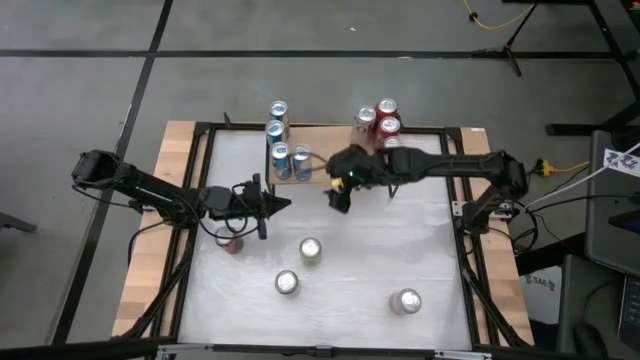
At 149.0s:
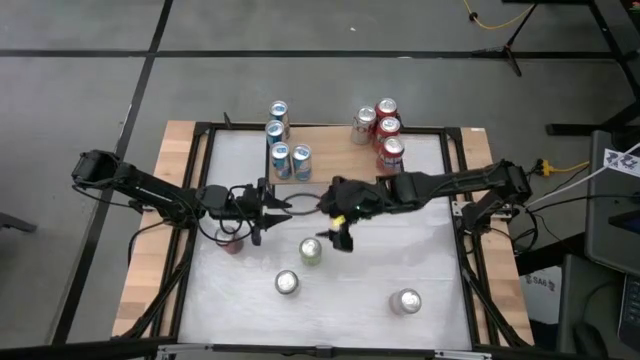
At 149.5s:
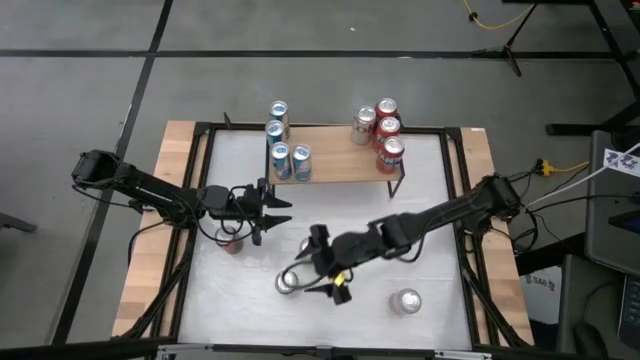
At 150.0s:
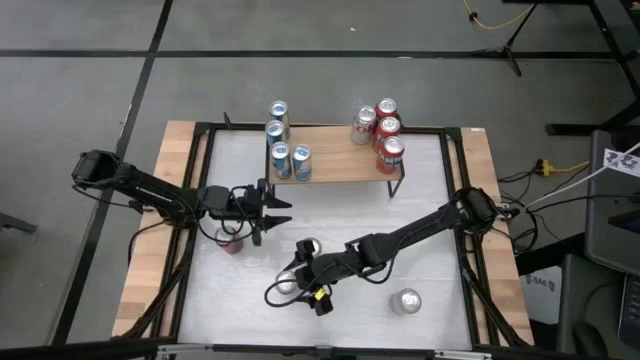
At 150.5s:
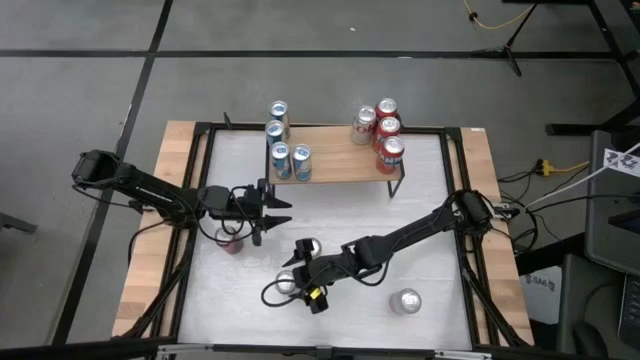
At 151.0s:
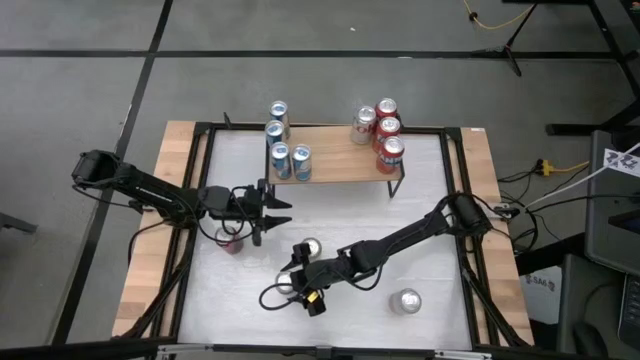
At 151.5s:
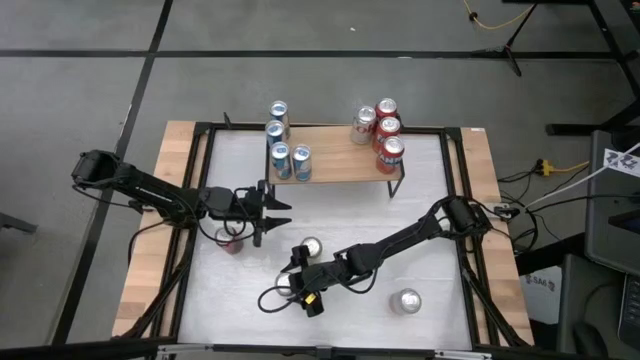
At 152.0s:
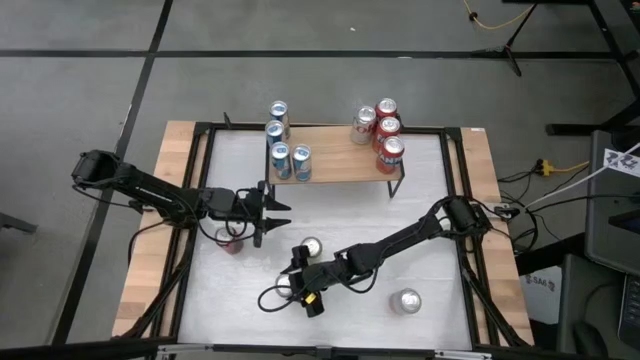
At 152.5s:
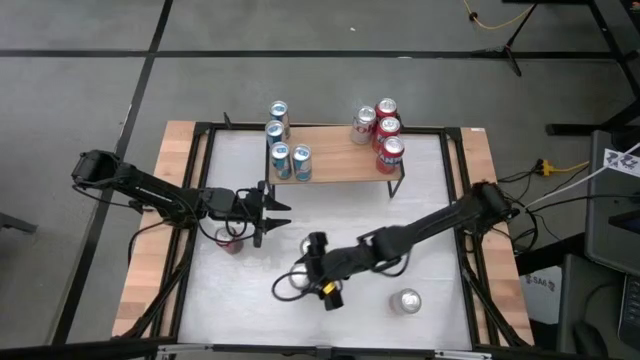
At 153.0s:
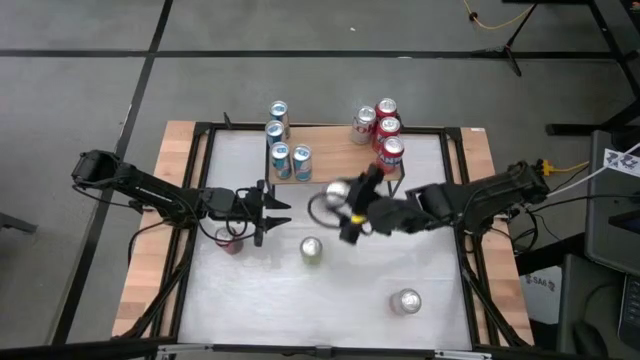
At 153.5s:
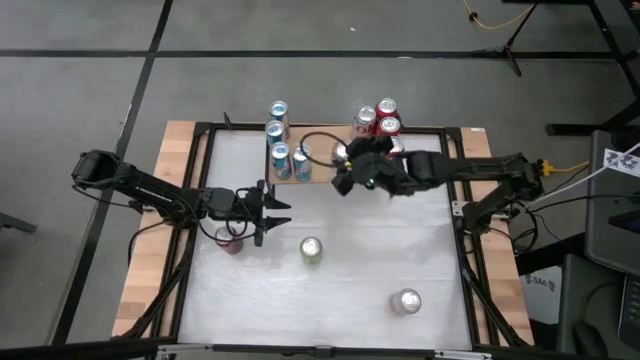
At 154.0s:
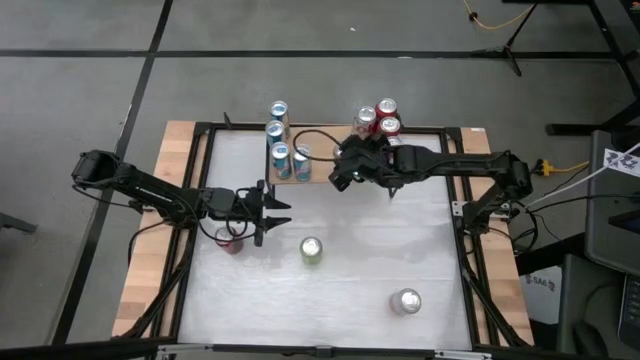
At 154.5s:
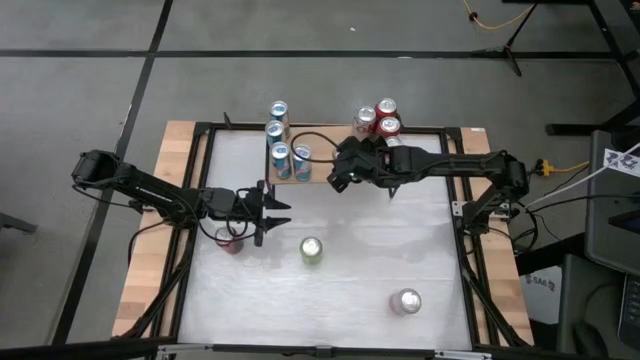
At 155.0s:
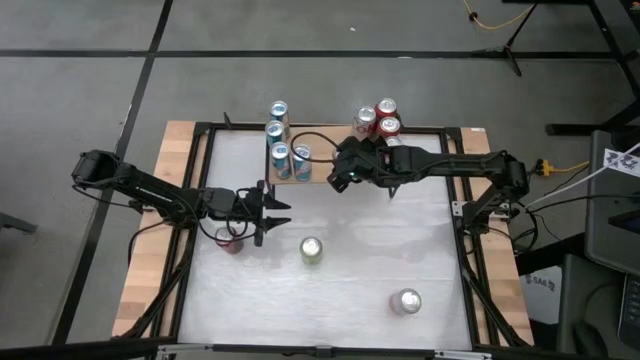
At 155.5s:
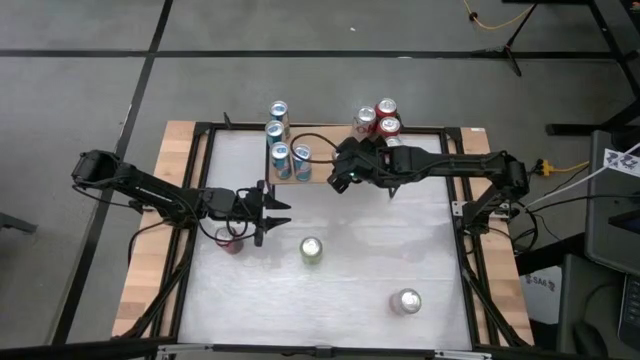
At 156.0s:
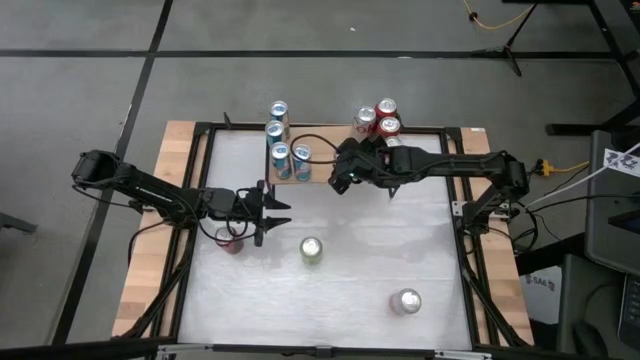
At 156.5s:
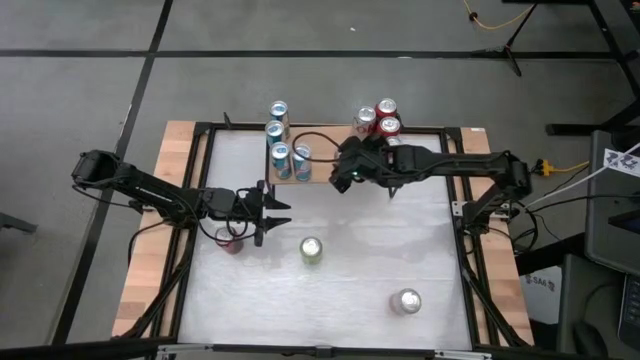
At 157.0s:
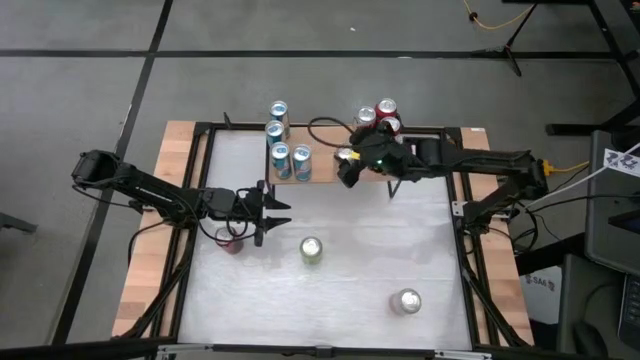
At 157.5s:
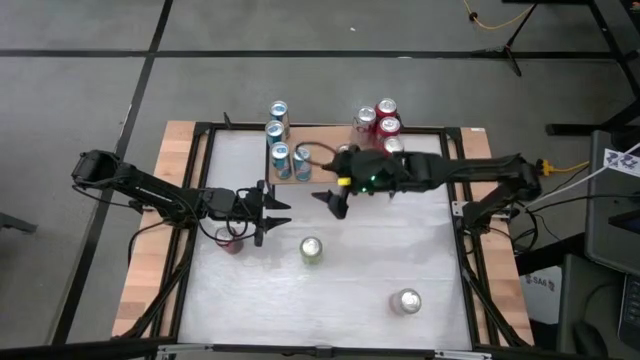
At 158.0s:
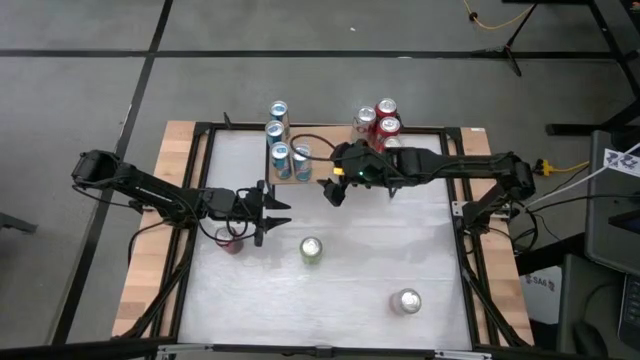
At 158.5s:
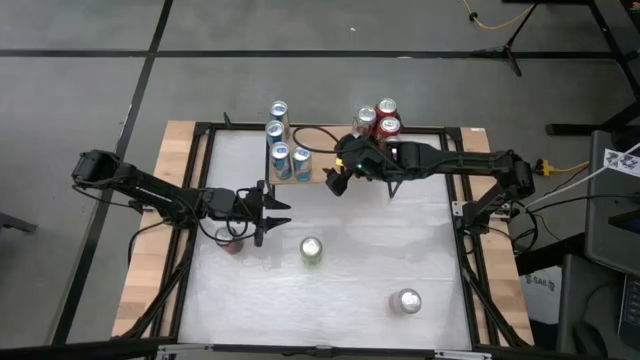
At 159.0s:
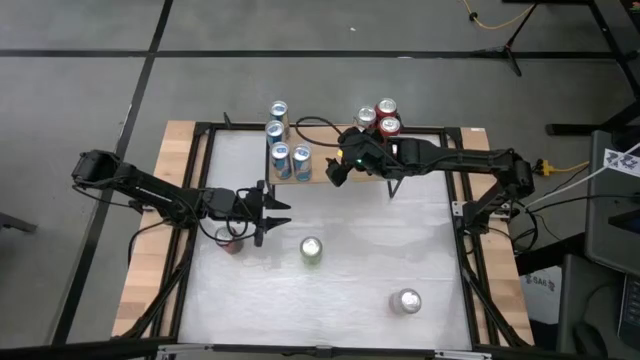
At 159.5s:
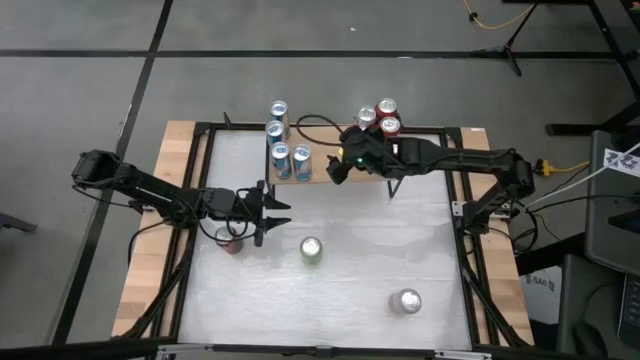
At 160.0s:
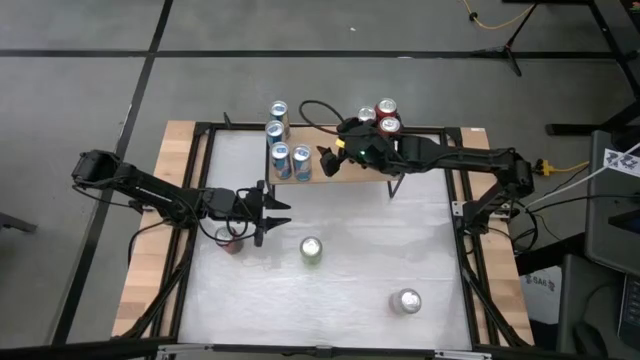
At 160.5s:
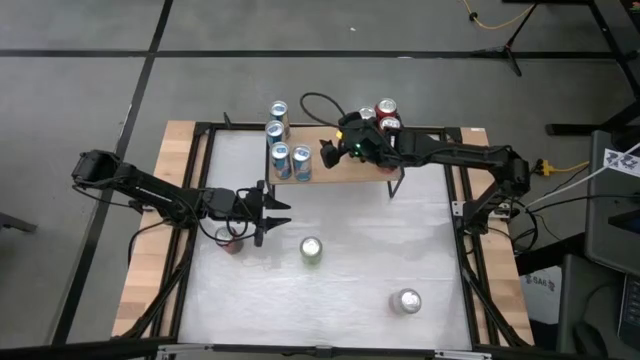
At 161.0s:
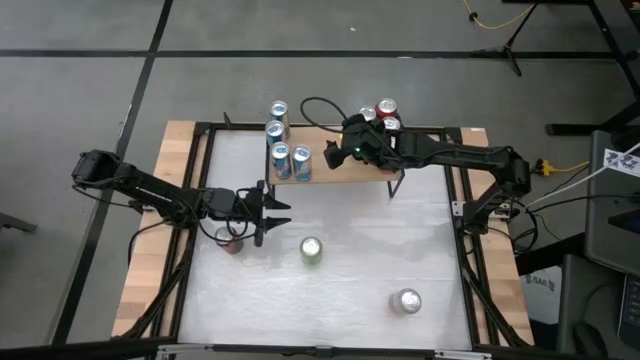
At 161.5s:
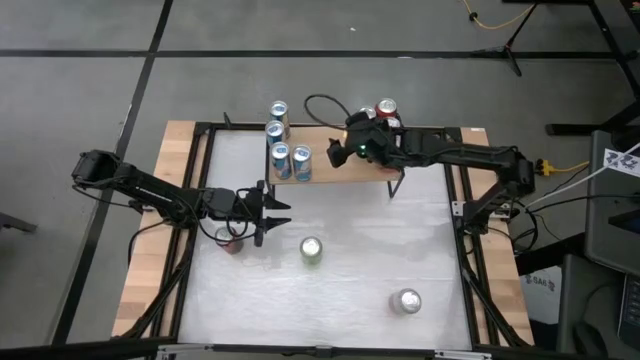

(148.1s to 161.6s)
Task: Sort soda cans
Put the red-silver soda can on the shelf aligned with the red-silver soda can

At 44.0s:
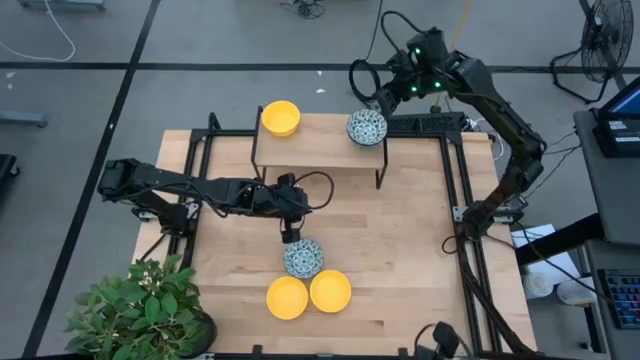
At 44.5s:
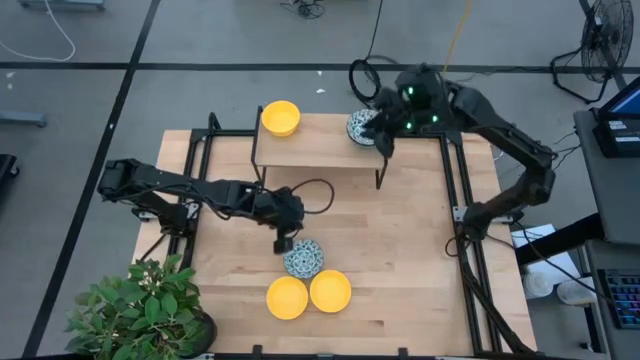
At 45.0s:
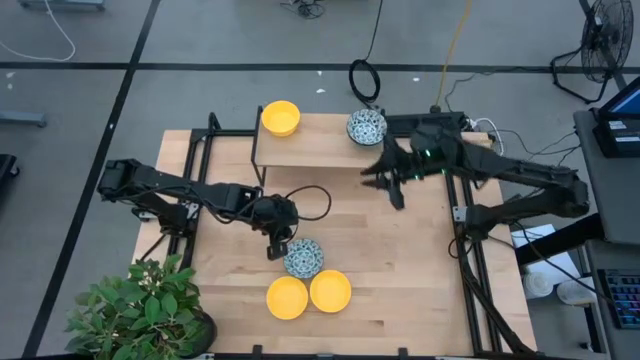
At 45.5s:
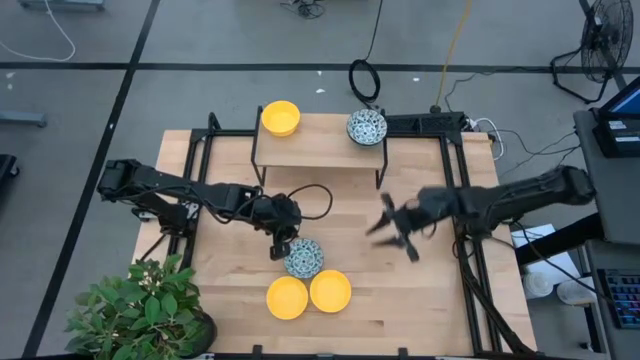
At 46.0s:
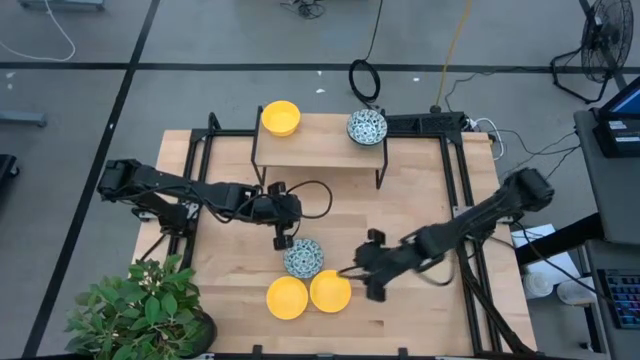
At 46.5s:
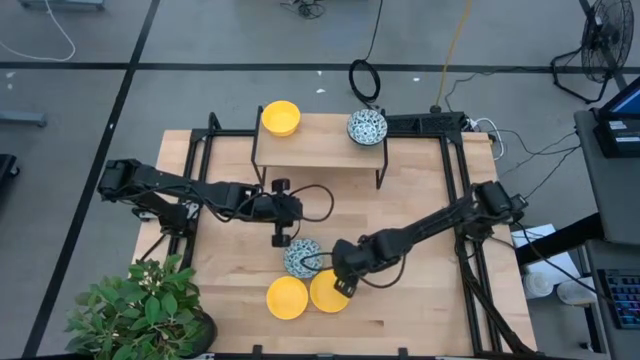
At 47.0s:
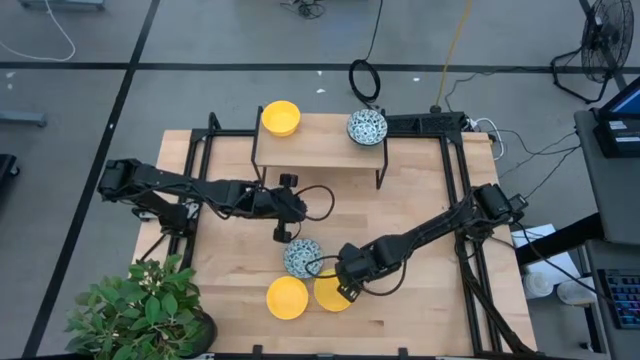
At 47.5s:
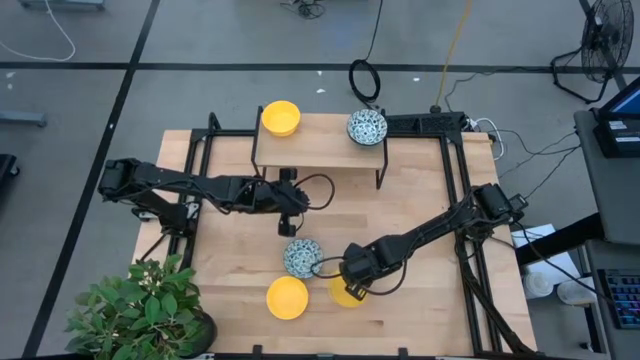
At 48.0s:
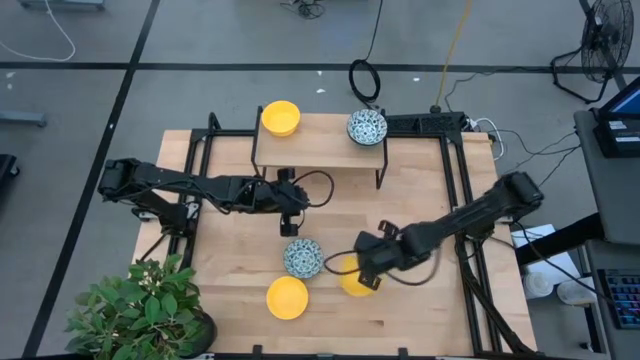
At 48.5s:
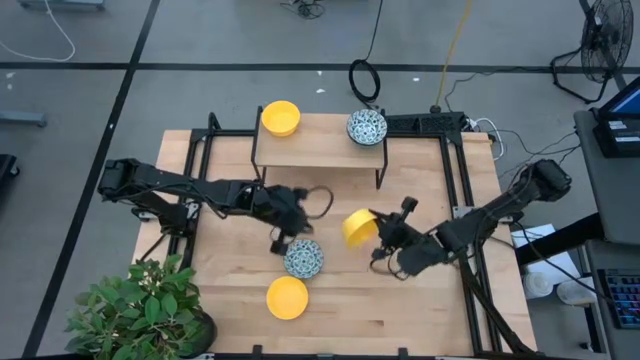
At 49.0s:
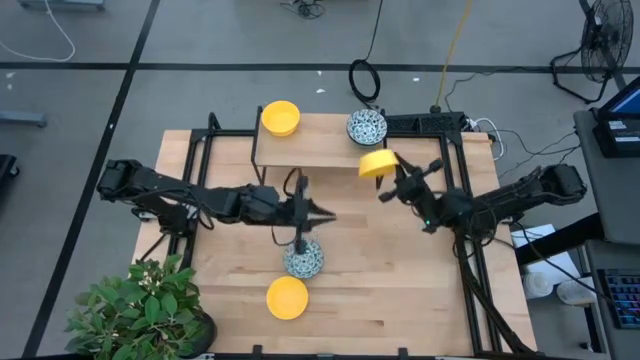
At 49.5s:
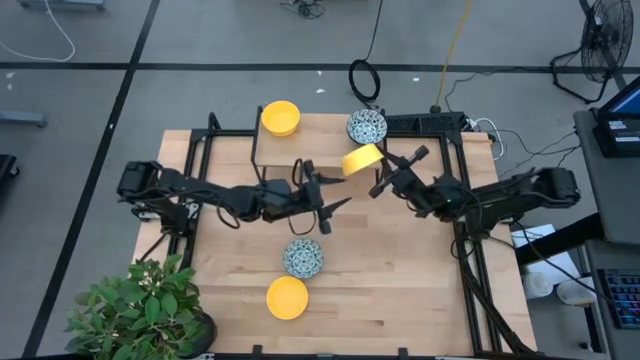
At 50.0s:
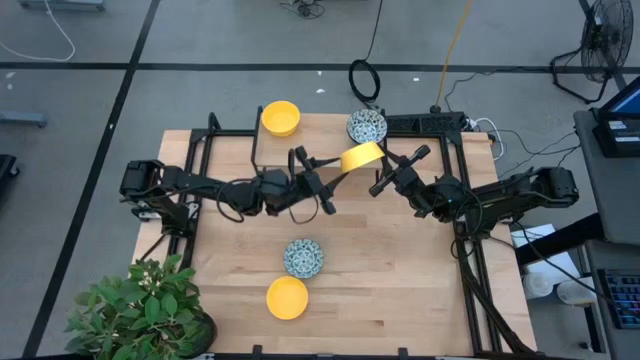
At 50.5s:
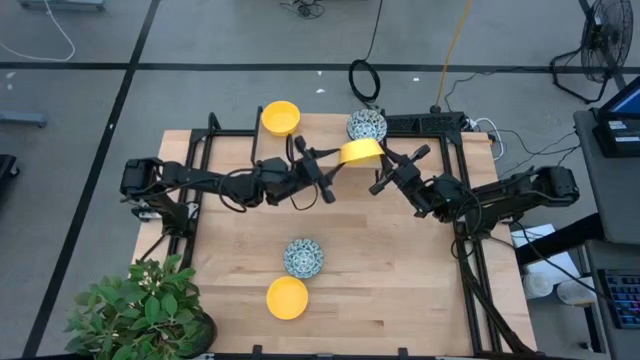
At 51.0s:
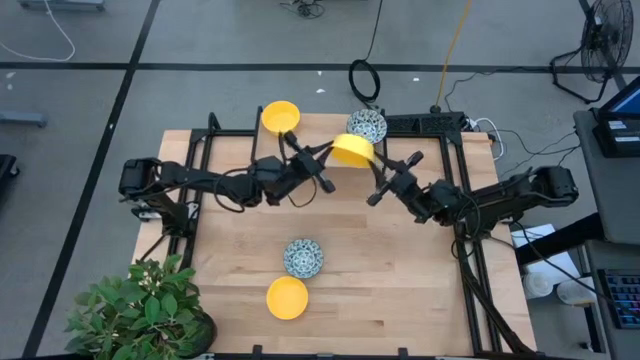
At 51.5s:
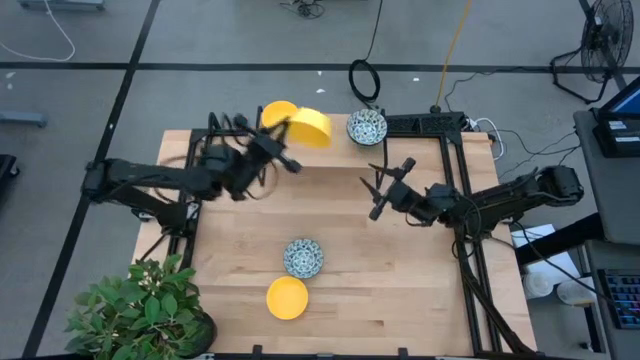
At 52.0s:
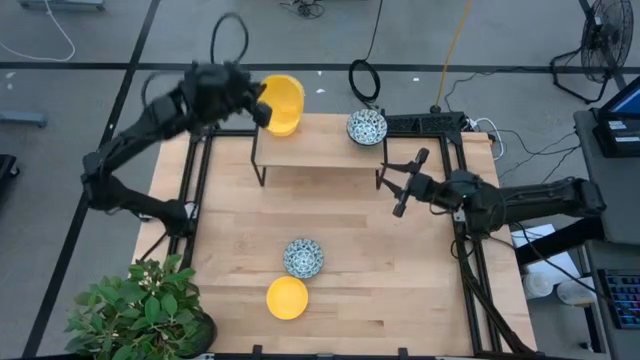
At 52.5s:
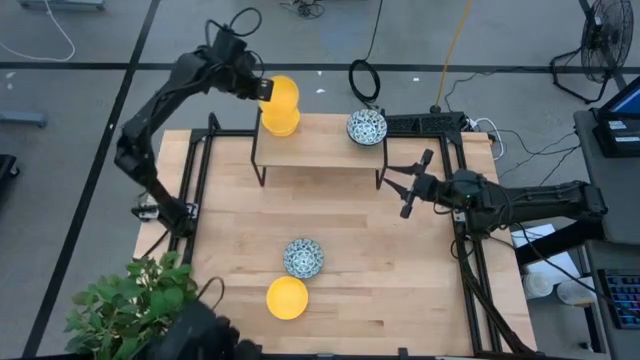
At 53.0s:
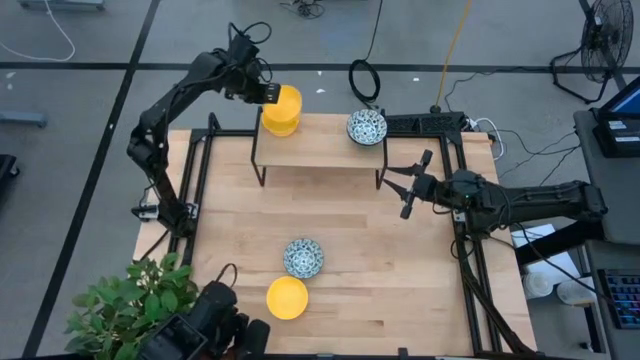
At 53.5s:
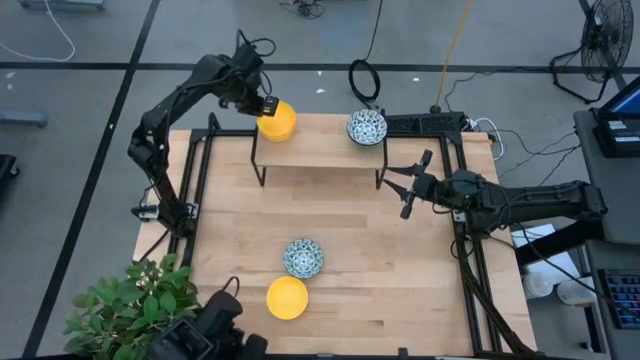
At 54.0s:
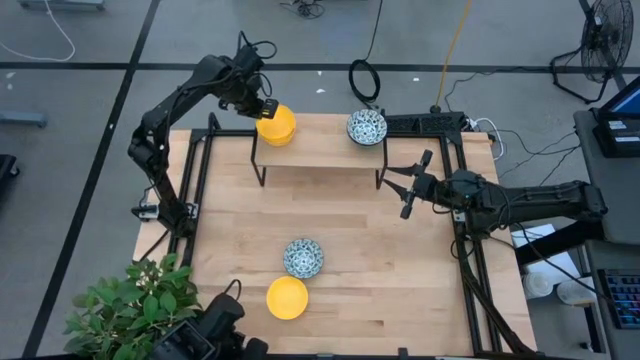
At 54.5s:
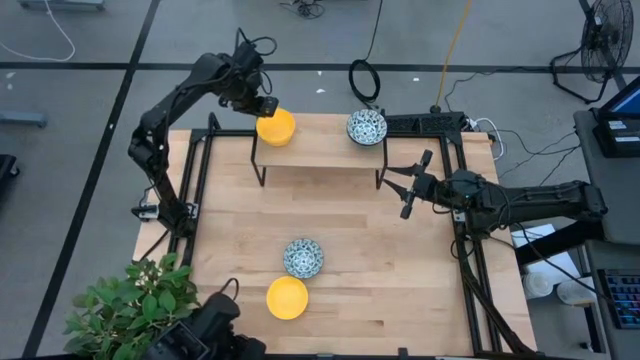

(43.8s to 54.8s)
Task: Pick & Place Mini bowls
Stack the right yellow bowl on top of the yellow bowl on the shelf
